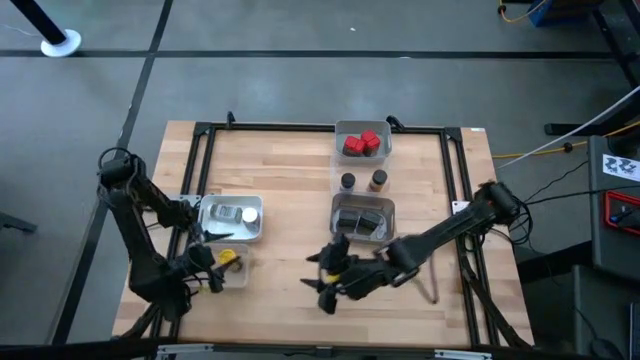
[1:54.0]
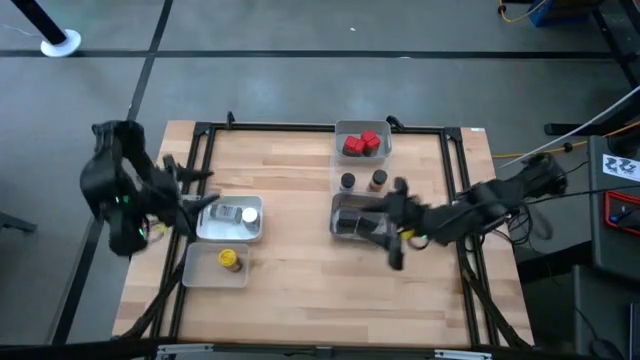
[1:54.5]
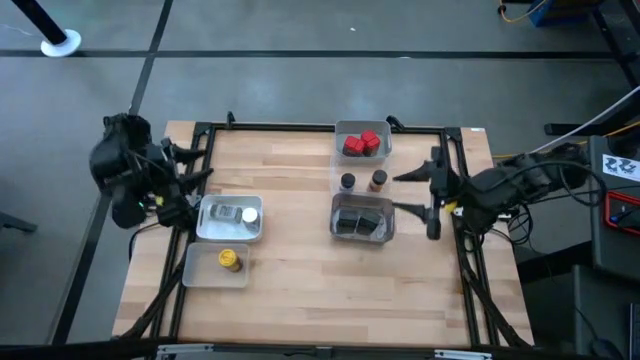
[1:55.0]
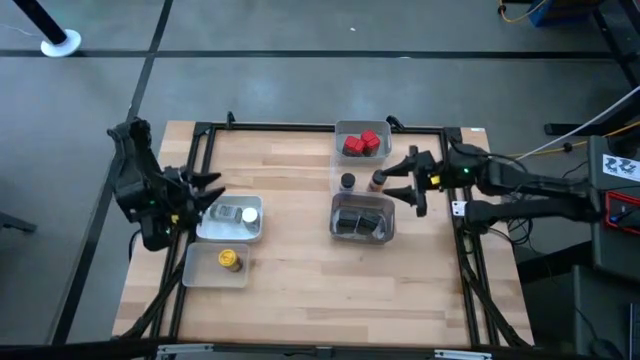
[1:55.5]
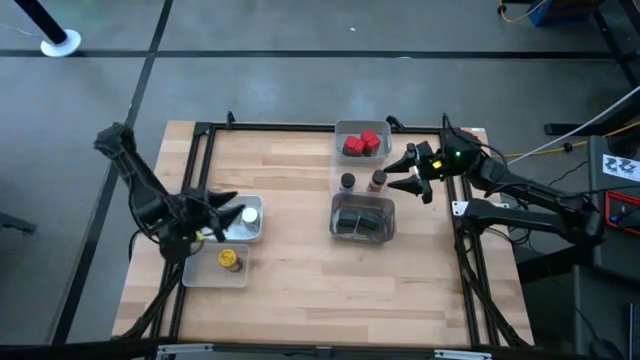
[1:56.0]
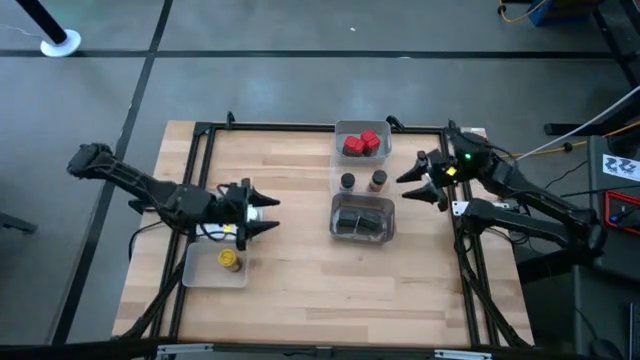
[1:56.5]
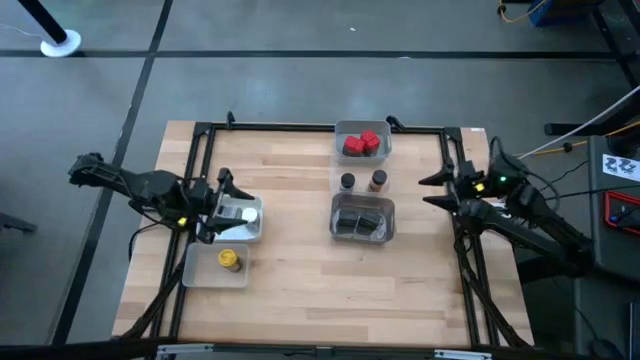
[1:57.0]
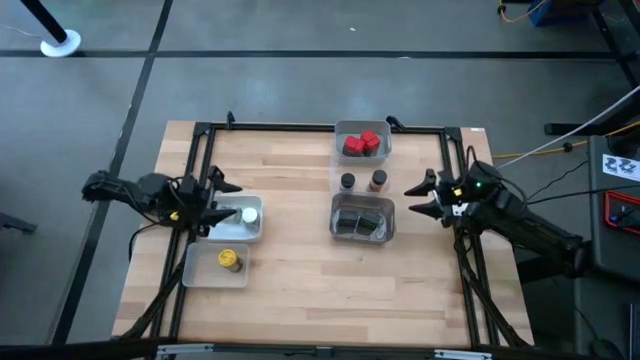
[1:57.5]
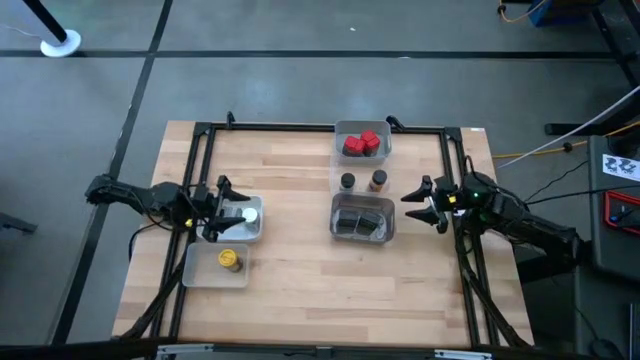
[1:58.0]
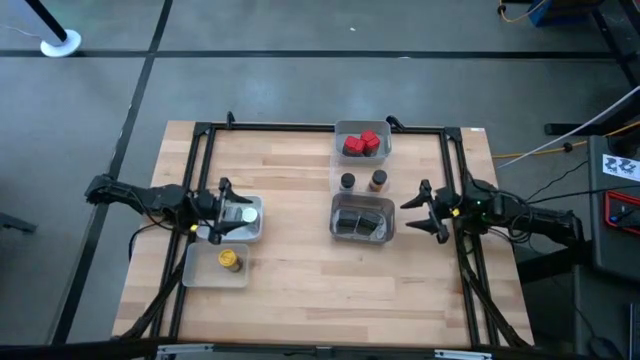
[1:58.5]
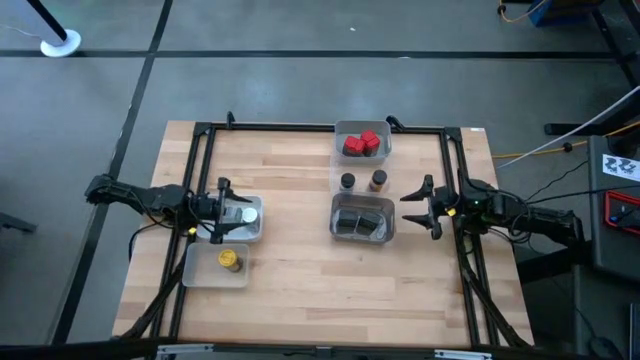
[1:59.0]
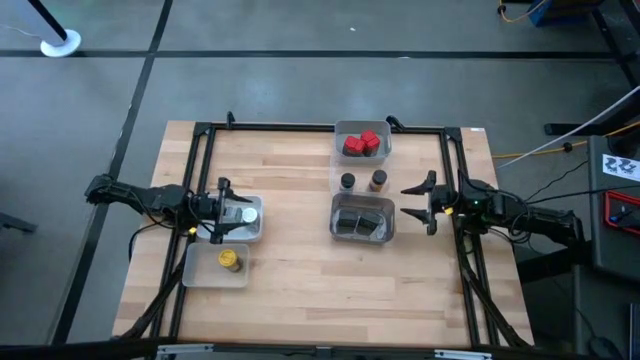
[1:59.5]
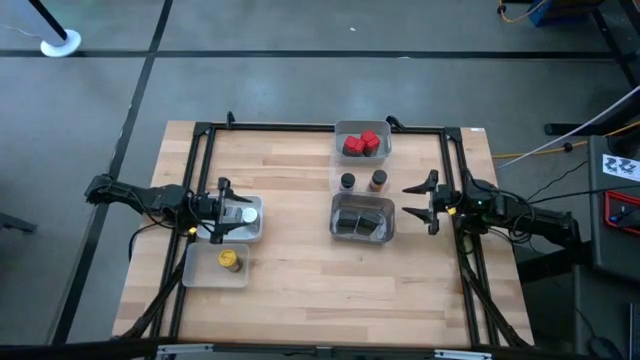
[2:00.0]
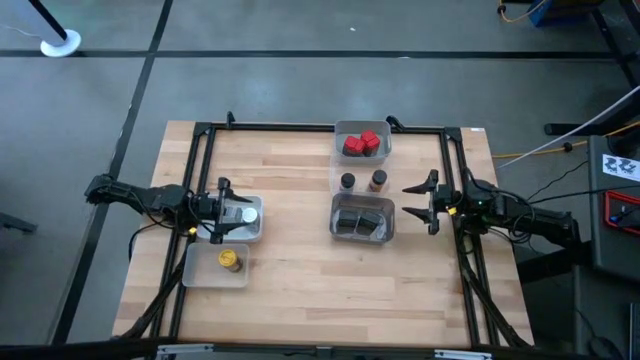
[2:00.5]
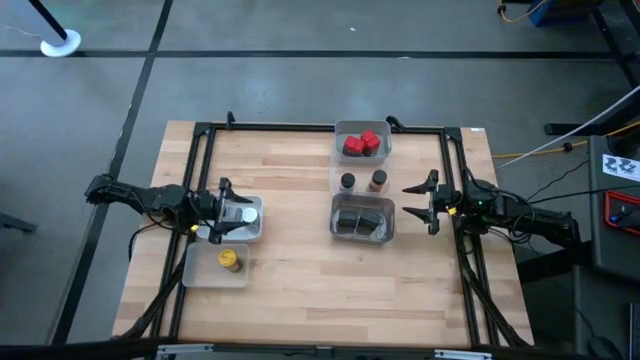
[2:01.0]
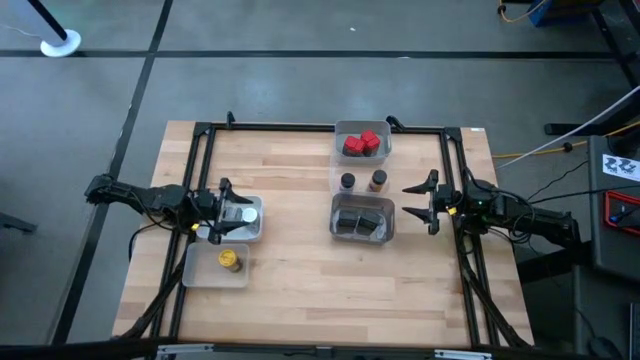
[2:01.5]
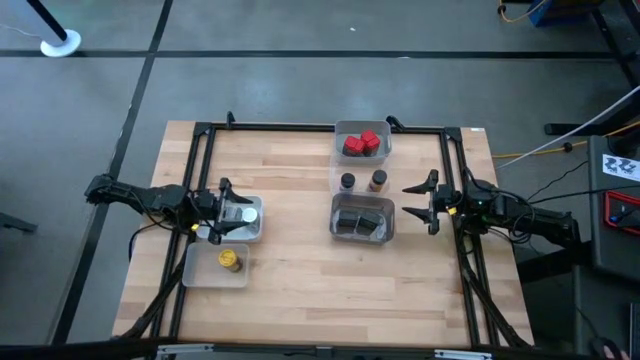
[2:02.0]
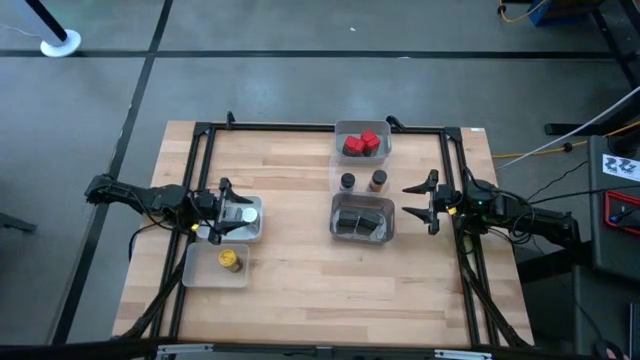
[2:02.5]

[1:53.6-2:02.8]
Task: Sort spices by type
Return to Home Position

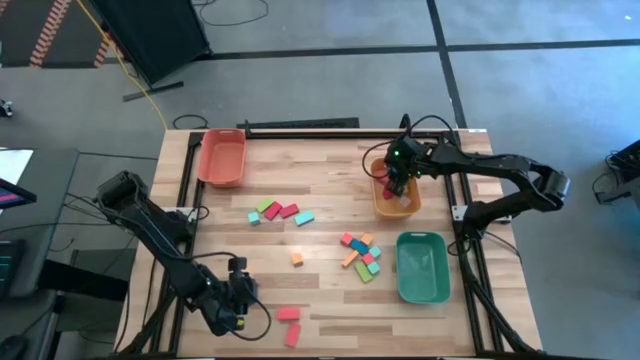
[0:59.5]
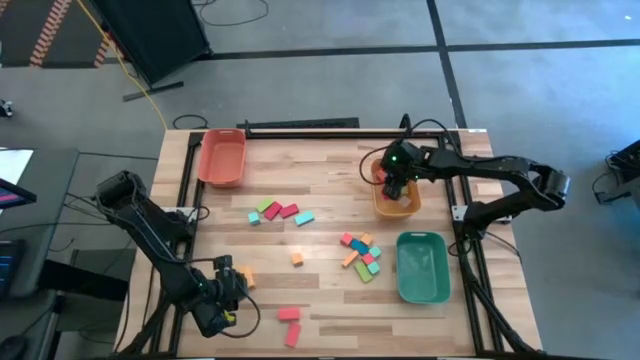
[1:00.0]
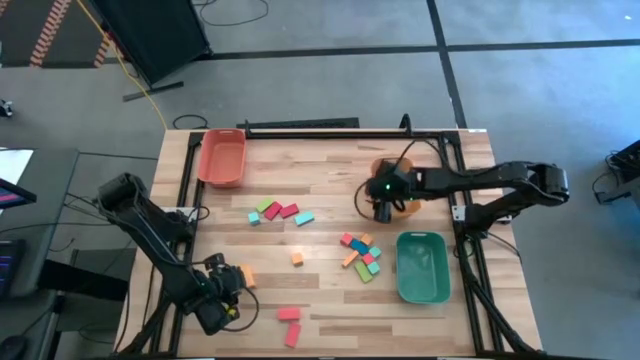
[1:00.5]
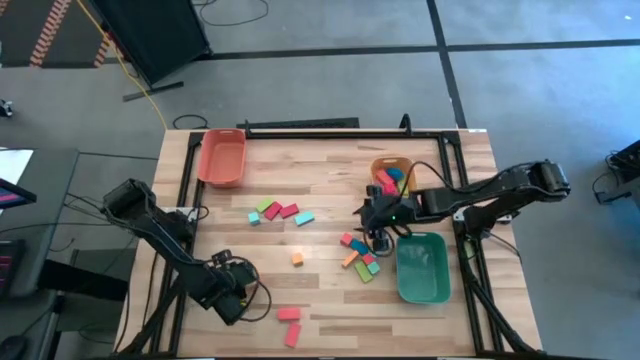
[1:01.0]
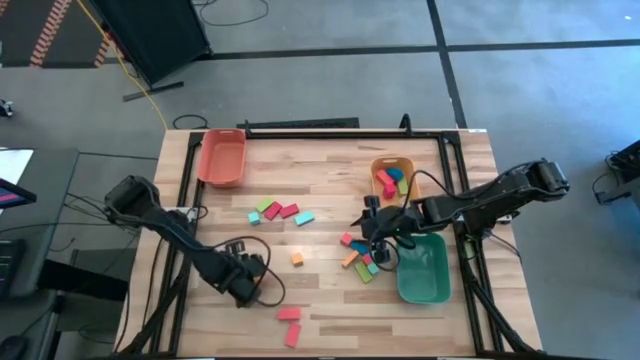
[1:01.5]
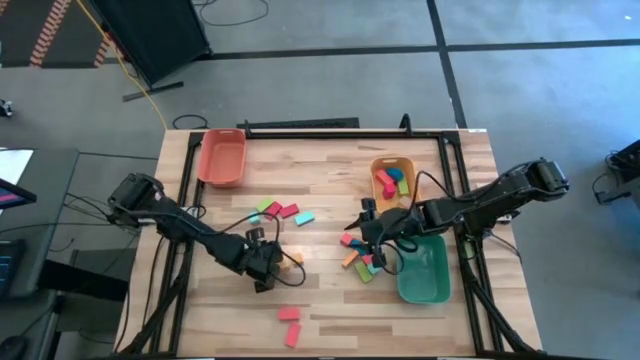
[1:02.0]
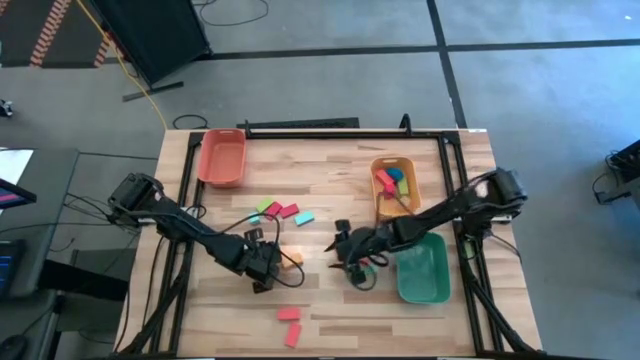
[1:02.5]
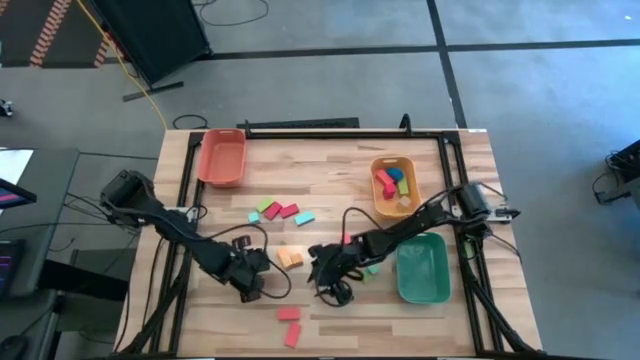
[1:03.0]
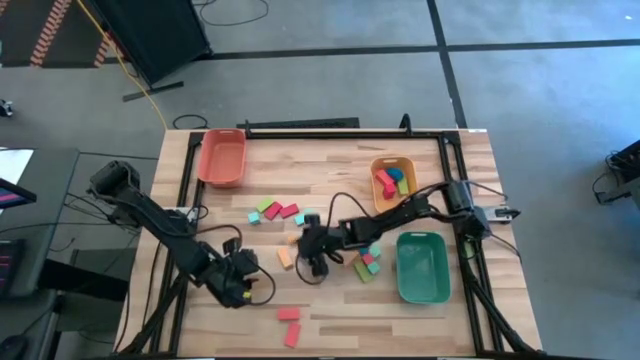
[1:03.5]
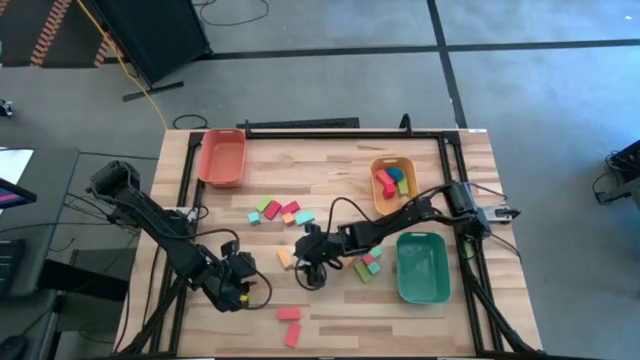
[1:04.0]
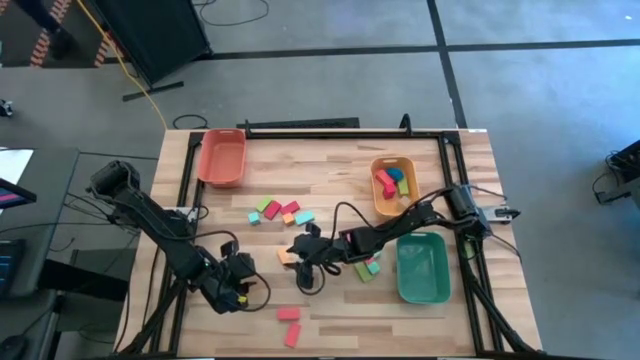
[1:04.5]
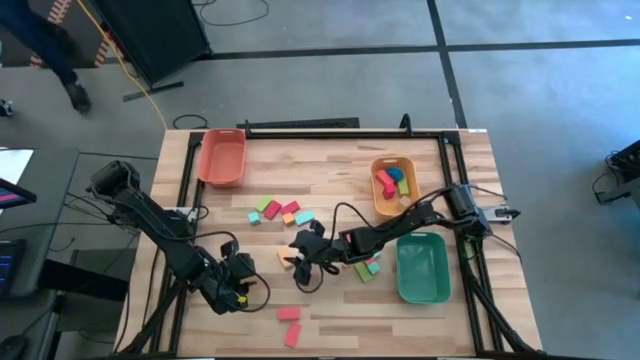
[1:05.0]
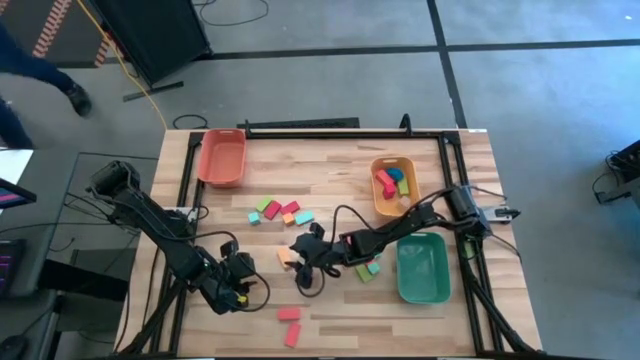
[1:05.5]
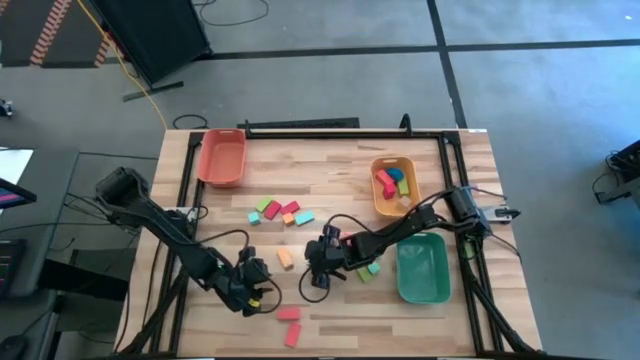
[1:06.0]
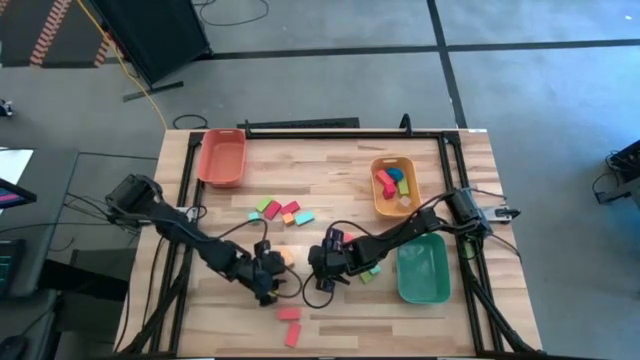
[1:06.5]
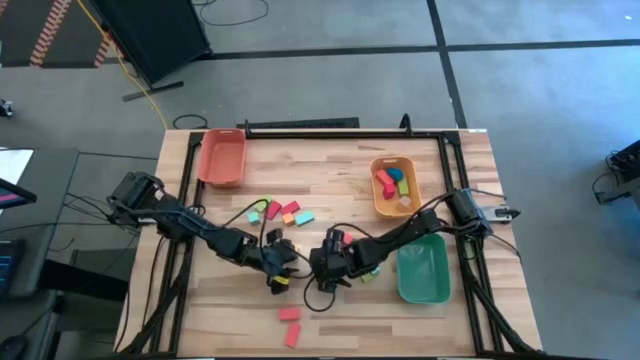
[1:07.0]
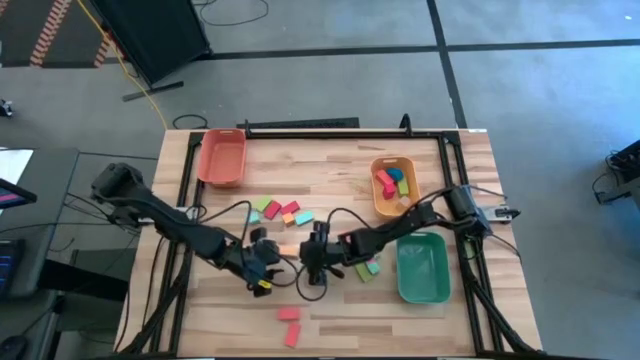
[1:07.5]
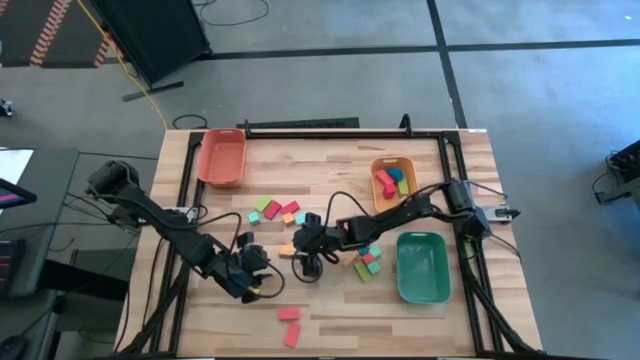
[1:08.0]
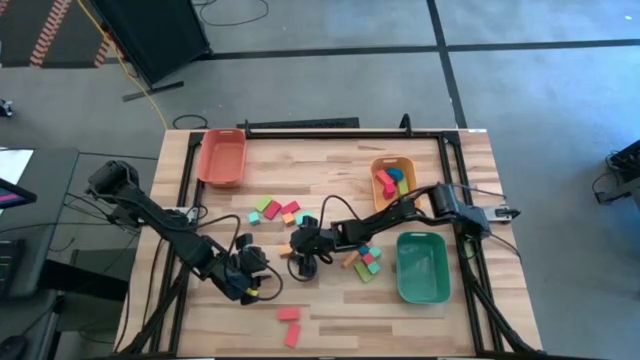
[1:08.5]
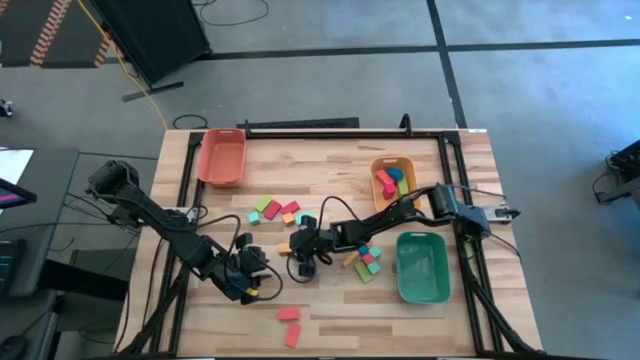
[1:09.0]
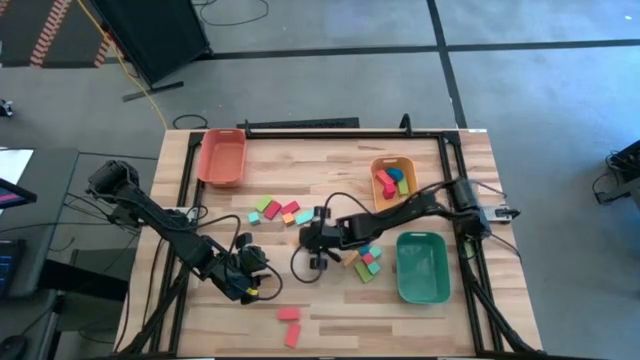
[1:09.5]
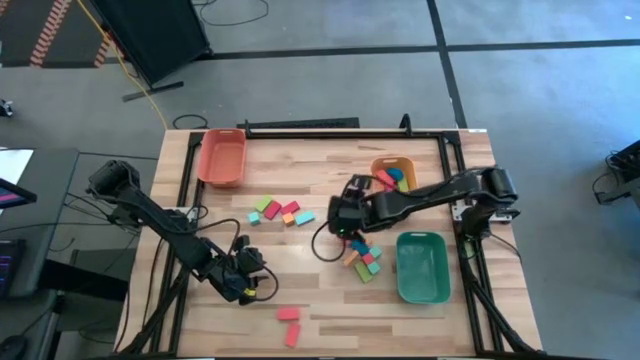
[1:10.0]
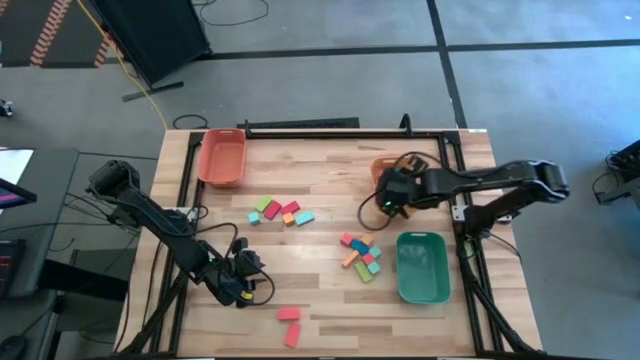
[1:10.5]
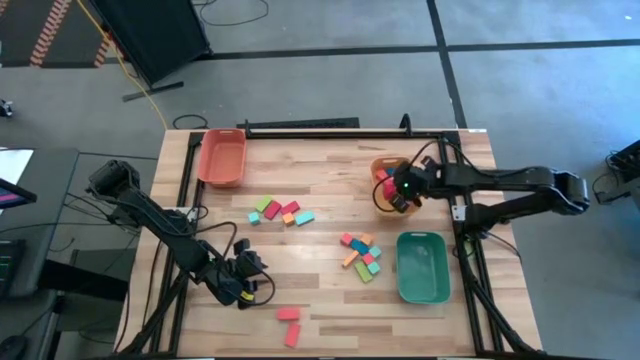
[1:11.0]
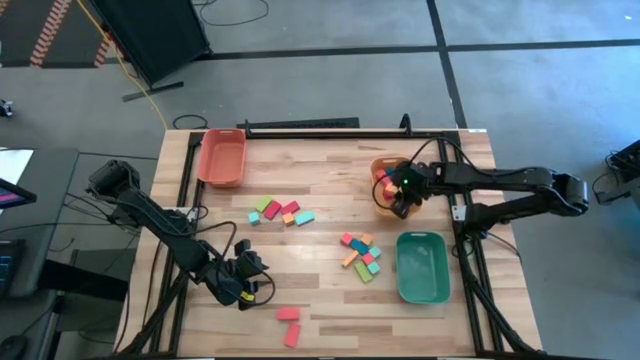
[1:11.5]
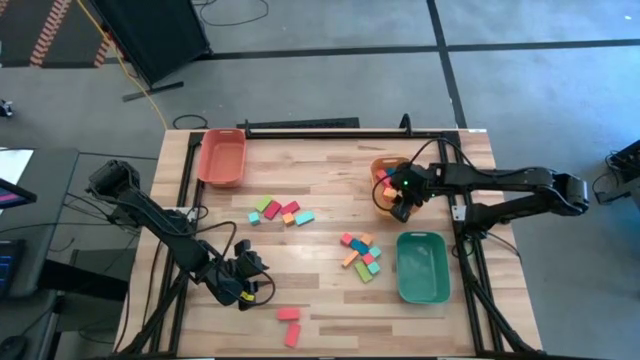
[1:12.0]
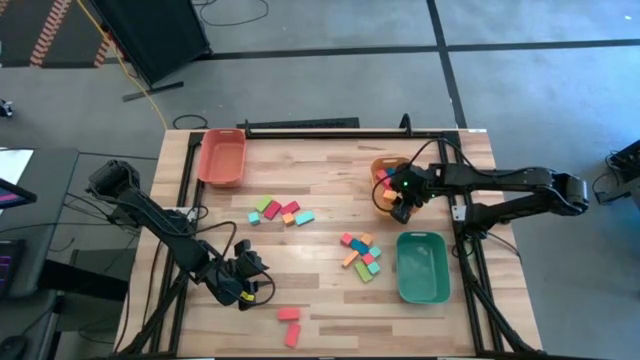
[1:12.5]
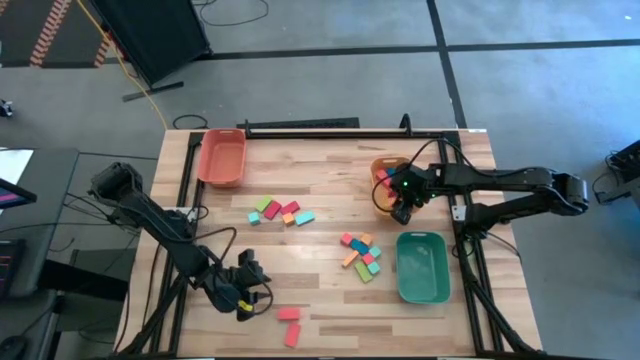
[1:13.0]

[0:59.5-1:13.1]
Task: Sort blocks by size
Put the large rectangular yellow block into the yellow bin
